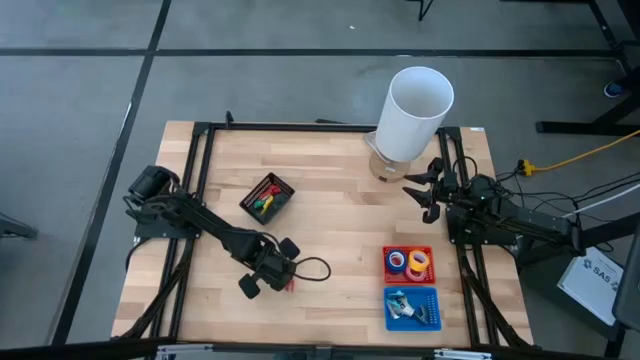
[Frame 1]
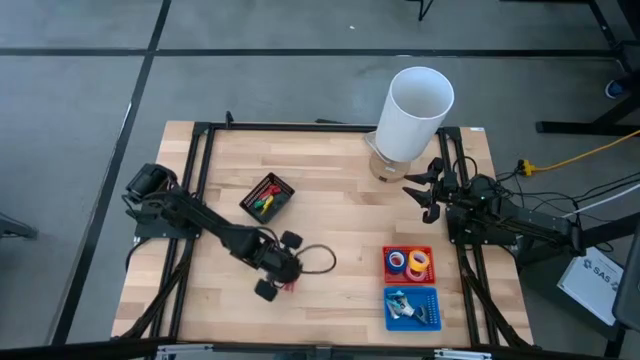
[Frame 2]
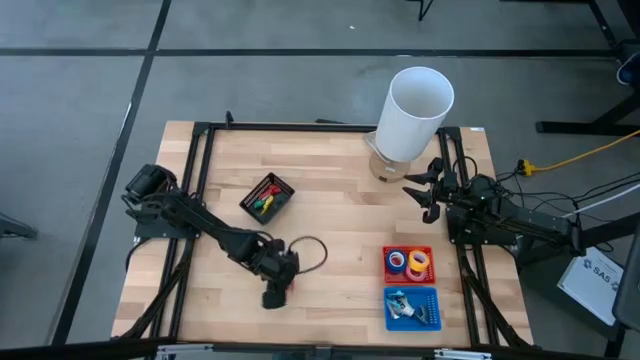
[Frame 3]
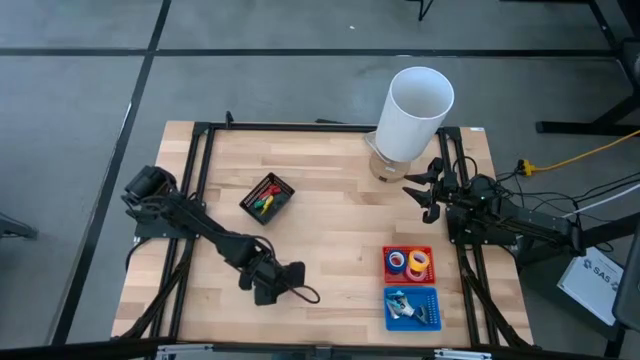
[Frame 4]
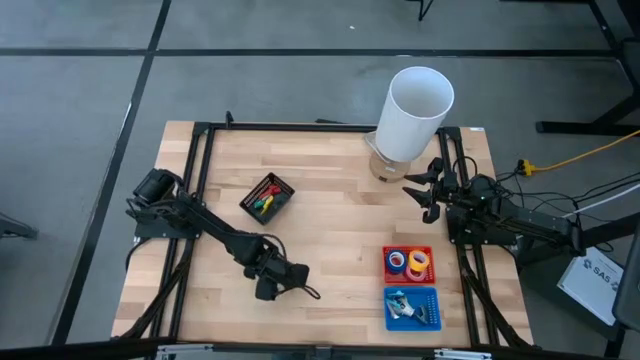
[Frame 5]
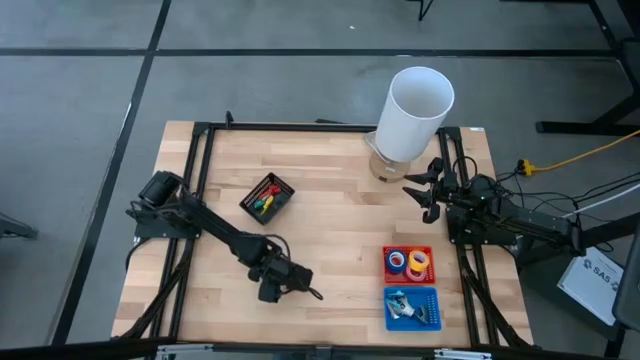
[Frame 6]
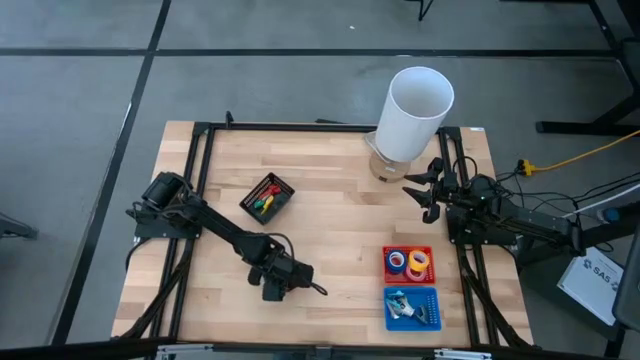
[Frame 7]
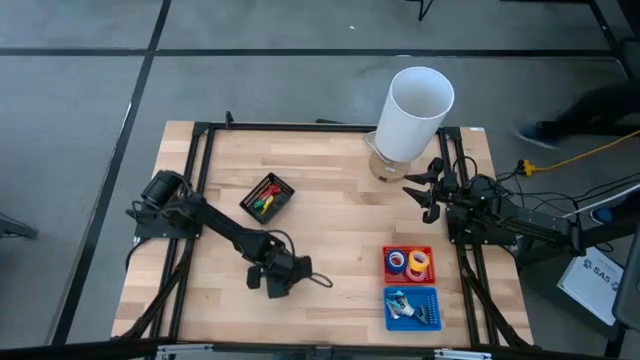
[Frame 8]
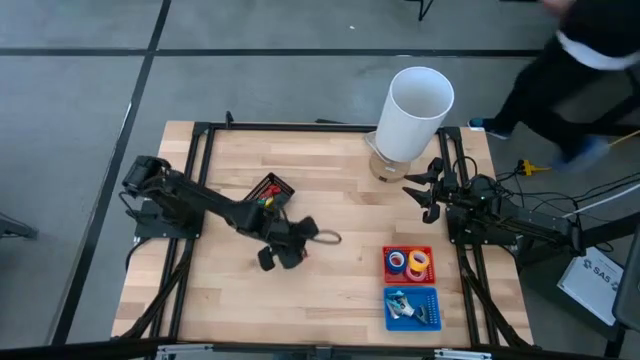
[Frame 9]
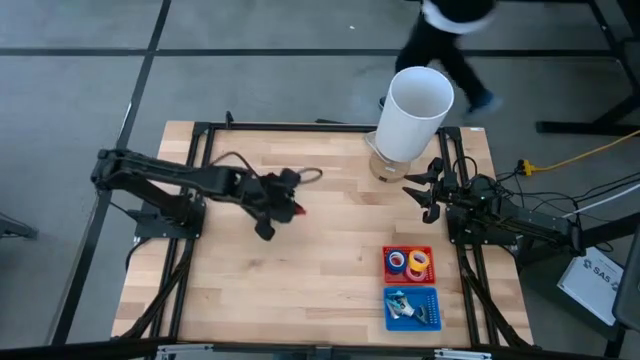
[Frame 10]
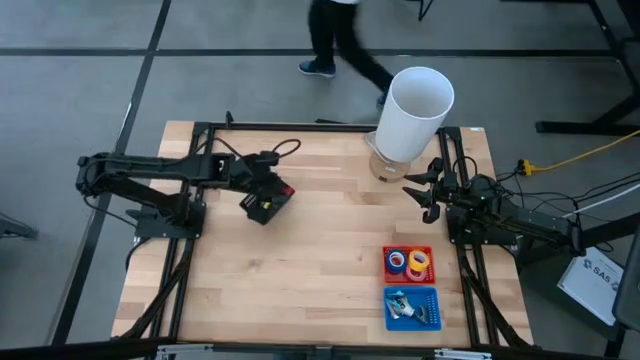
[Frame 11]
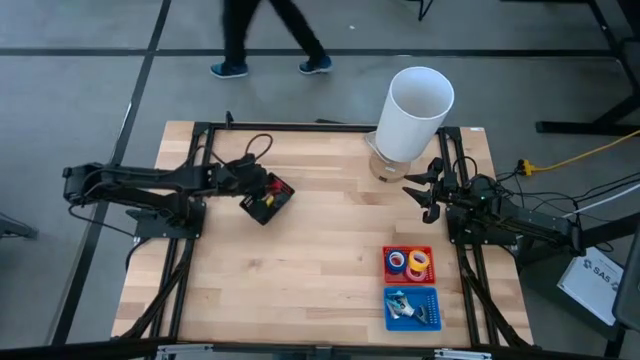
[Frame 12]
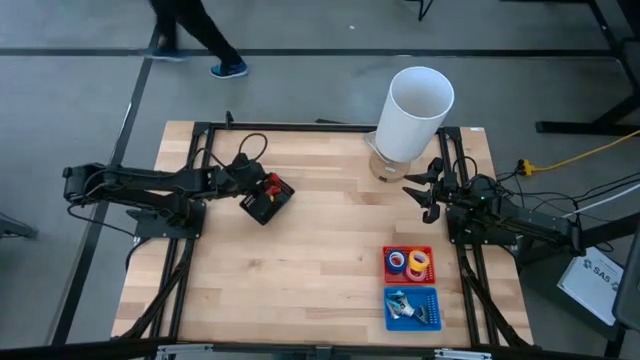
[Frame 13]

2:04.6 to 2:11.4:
Task: Pick and place Stapler, Stapler remover, tape
Put the red stapler into the black basket

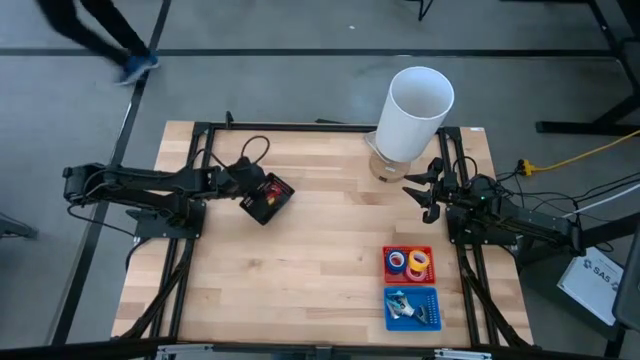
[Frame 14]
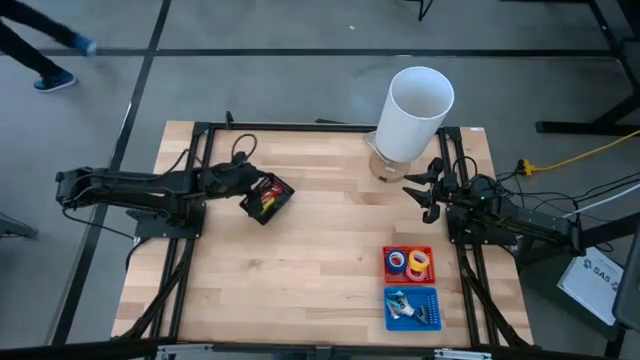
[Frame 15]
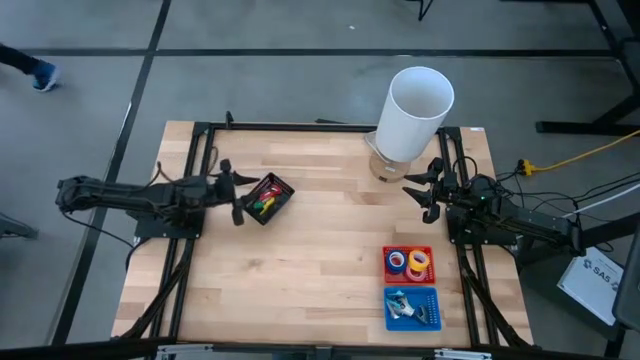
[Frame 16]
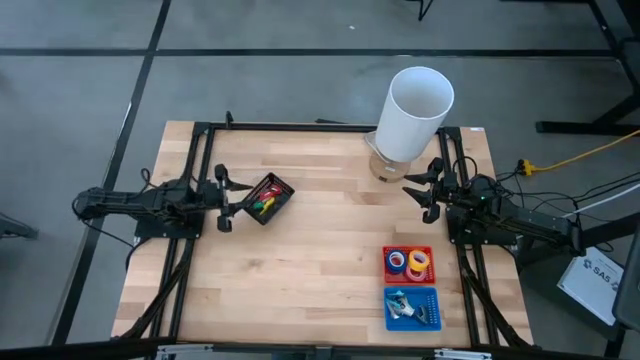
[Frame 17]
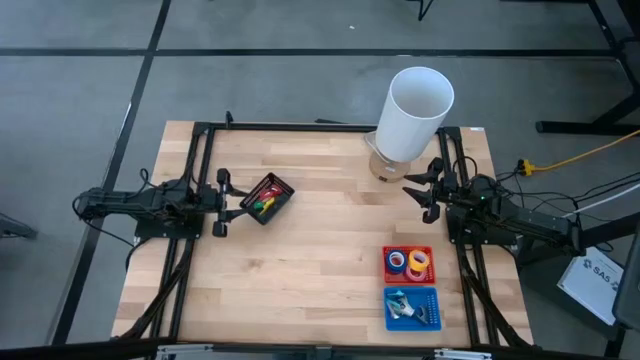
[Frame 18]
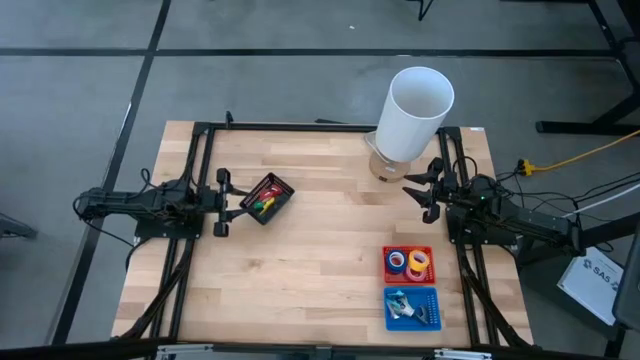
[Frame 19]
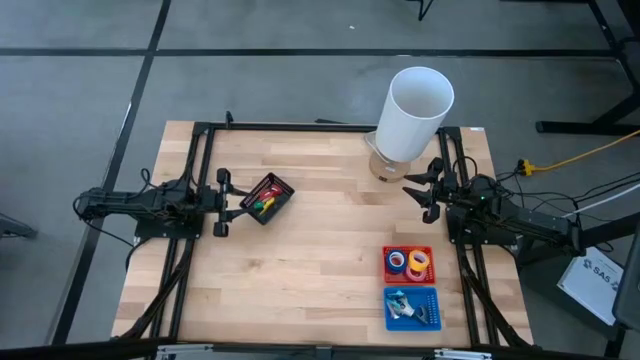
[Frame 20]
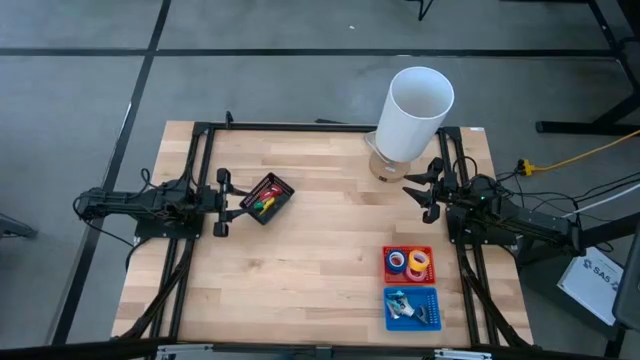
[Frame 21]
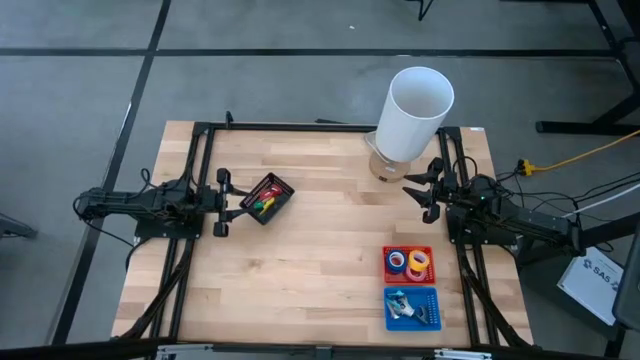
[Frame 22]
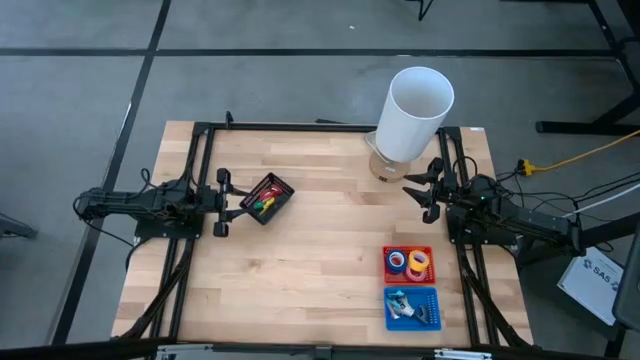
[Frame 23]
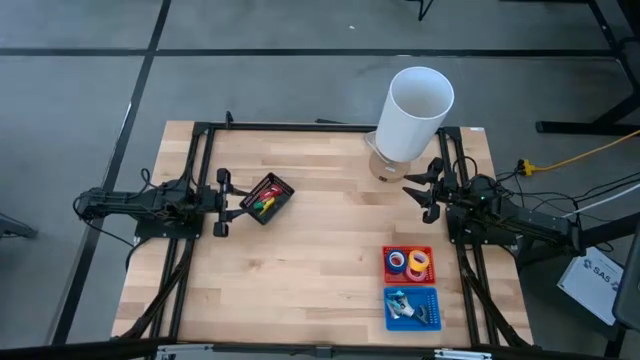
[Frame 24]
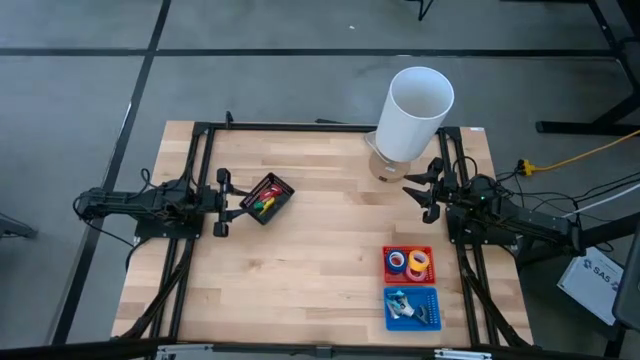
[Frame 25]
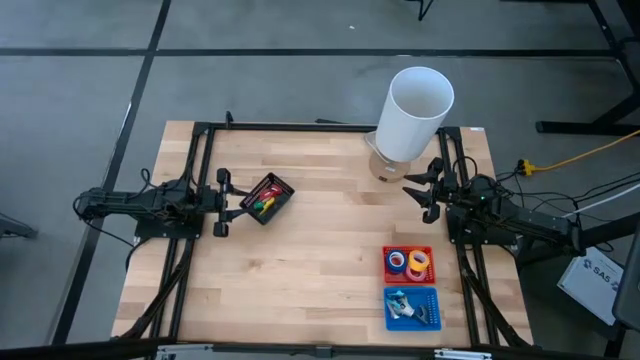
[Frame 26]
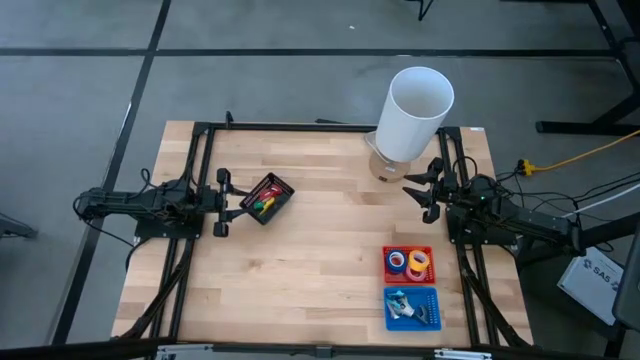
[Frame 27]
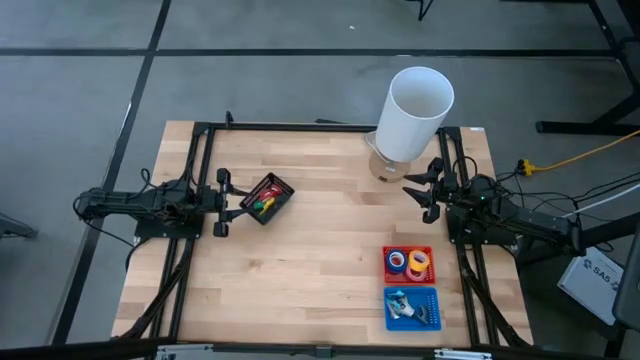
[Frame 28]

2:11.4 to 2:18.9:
Return to Home Position

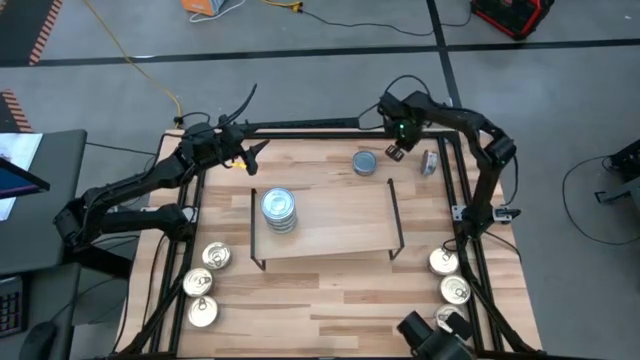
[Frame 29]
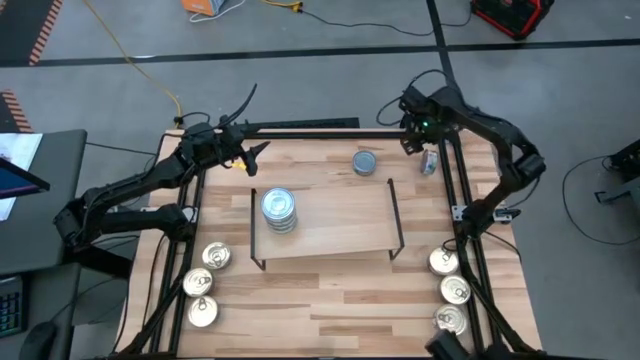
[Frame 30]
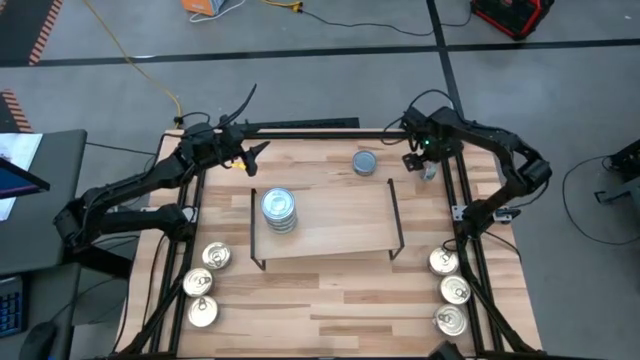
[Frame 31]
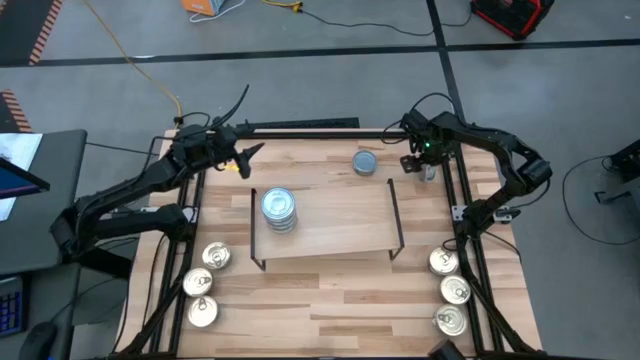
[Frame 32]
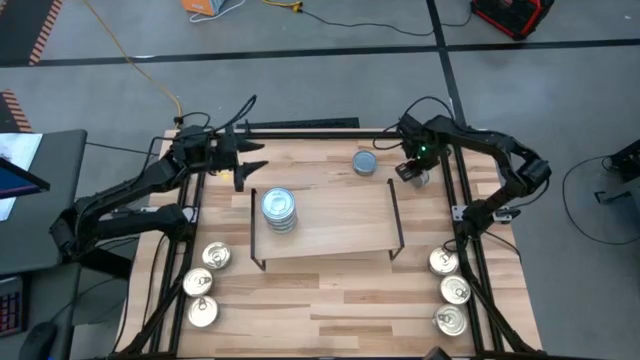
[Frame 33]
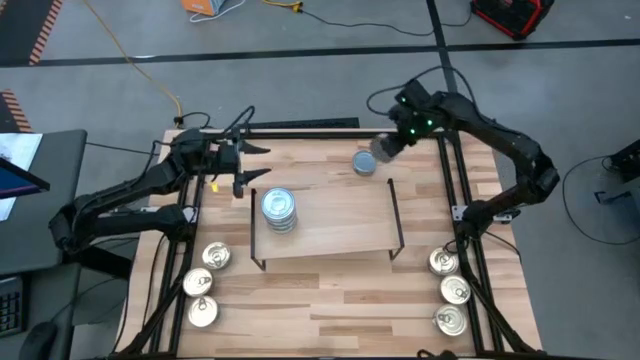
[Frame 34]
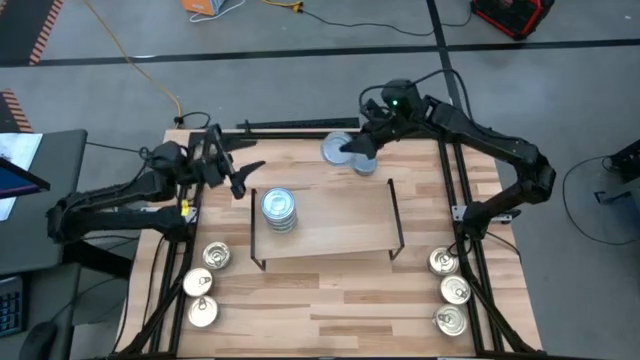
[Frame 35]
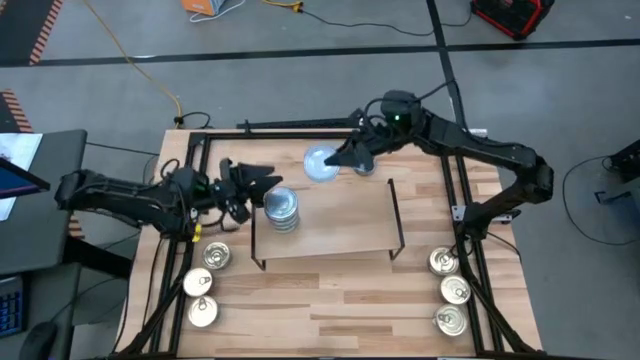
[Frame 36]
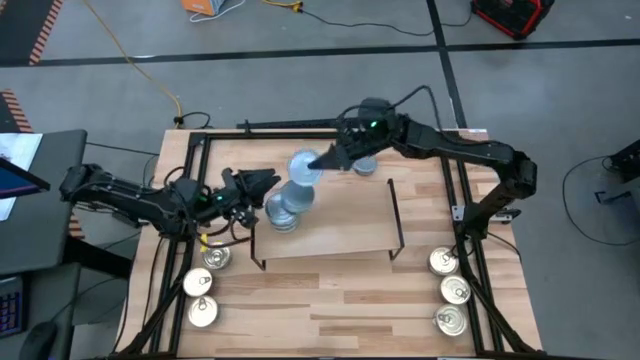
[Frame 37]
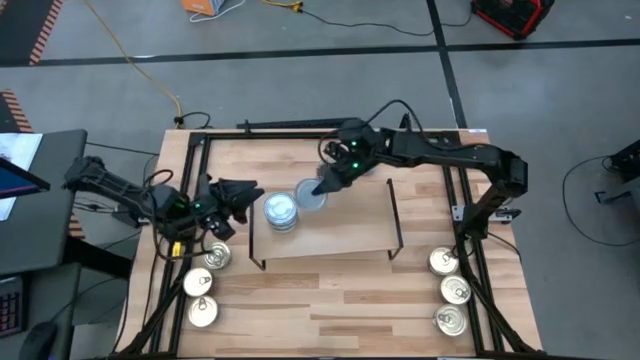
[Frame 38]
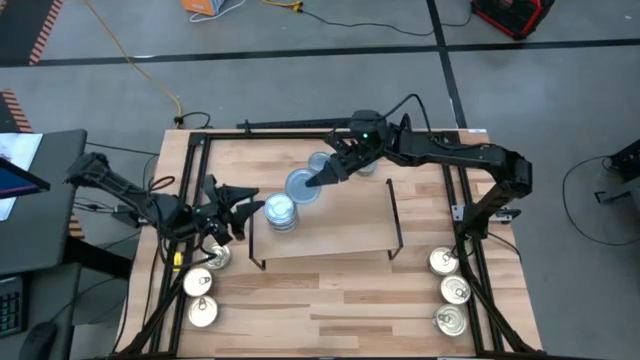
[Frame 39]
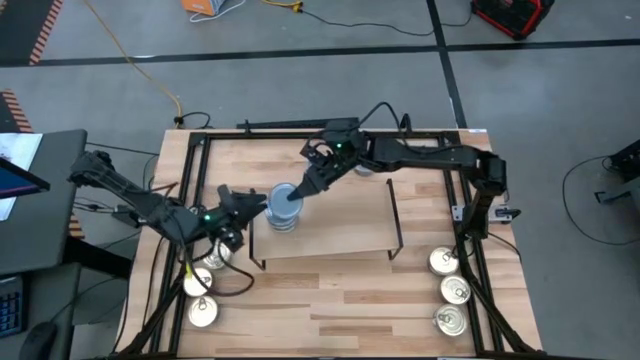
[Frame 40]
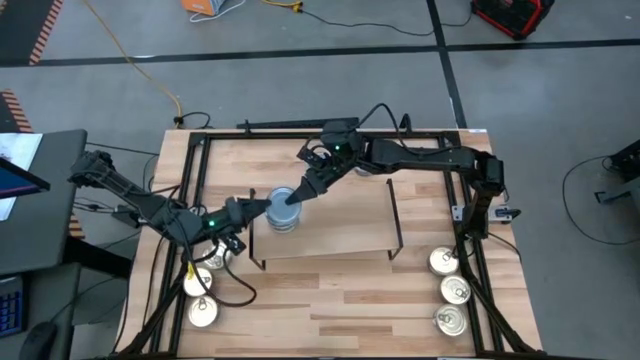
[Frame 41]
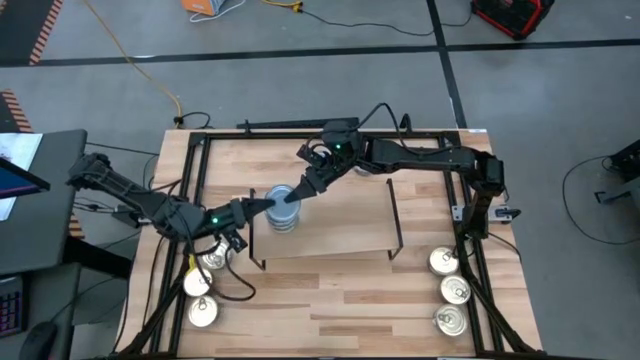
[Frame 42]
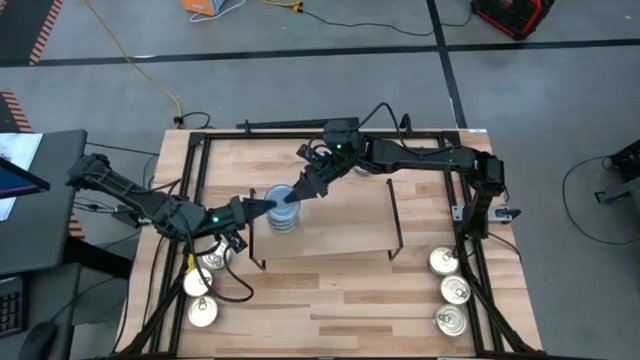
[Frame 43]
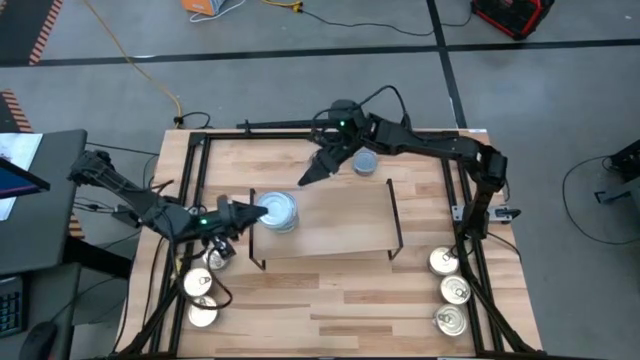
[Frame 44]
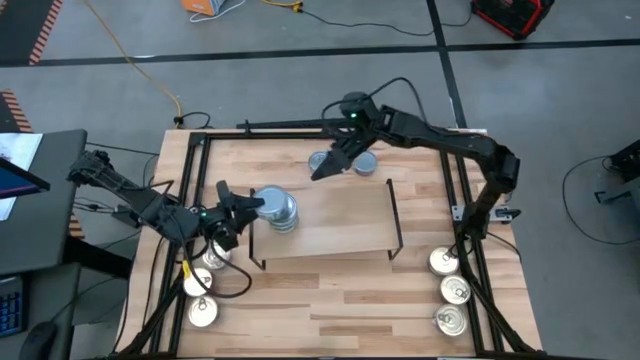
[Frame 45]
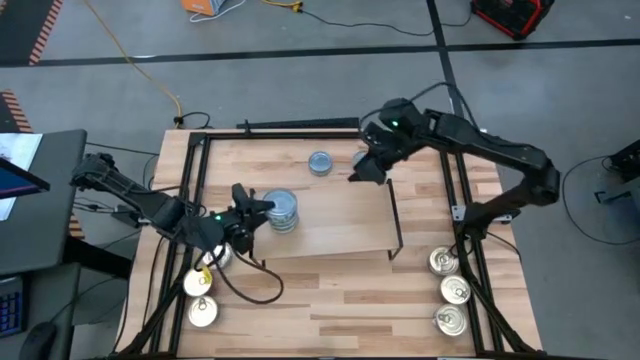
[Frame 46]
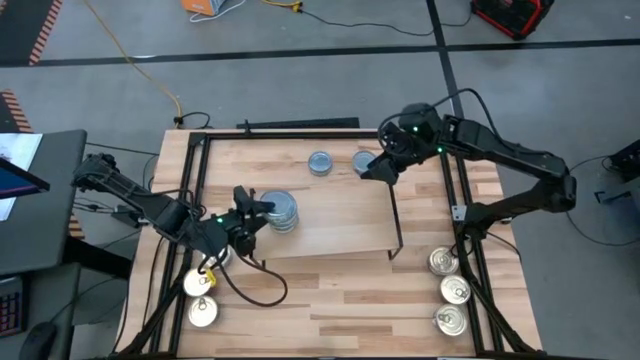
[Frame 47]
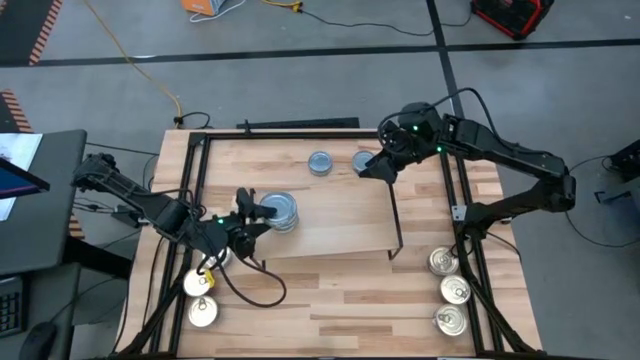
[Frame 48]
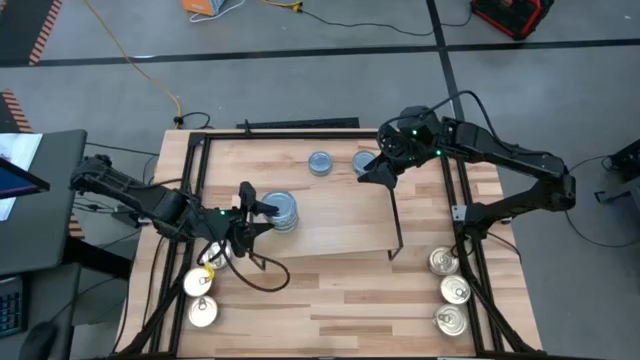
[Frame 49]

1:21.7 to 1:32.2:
Task: Stack canned seafood by type on shelf
Stack the green tuna can on top of the green tuna can on the shelf
